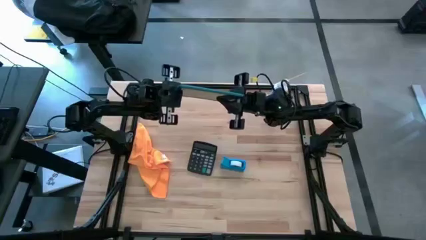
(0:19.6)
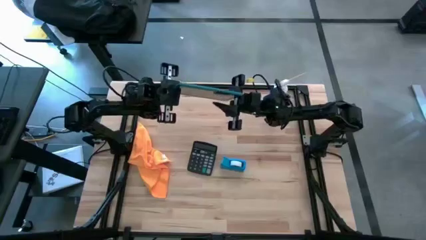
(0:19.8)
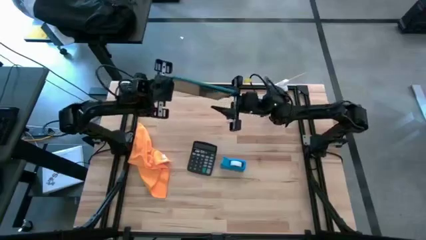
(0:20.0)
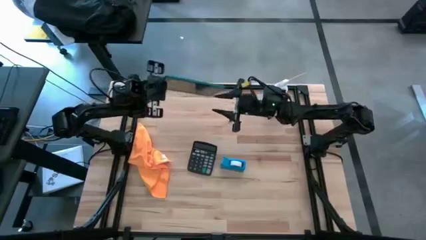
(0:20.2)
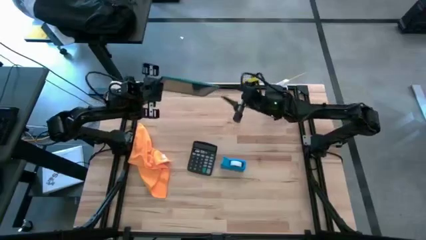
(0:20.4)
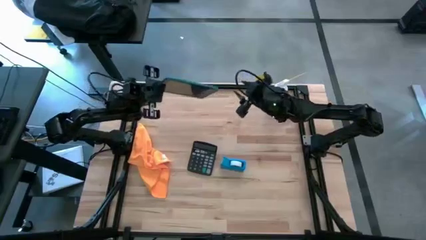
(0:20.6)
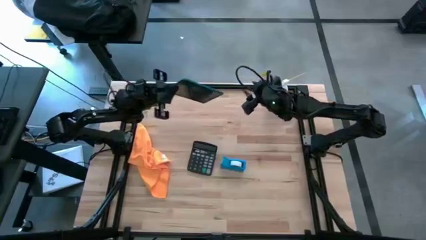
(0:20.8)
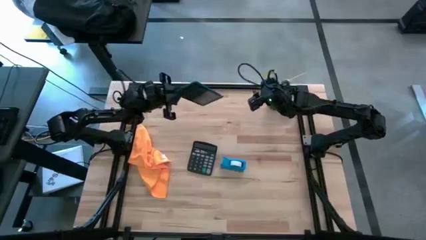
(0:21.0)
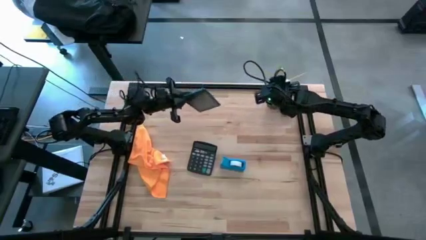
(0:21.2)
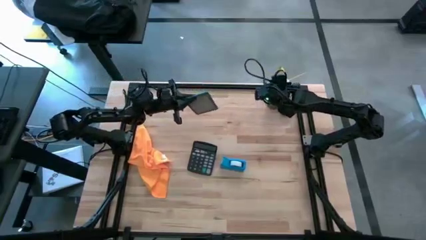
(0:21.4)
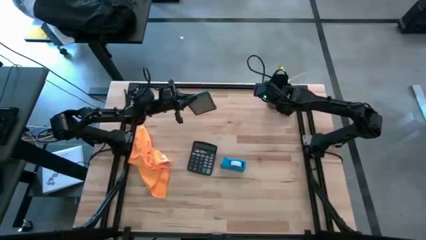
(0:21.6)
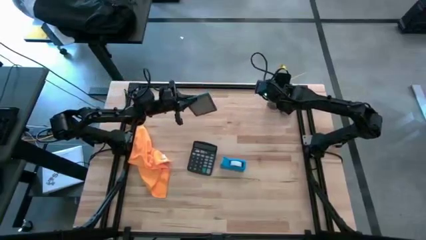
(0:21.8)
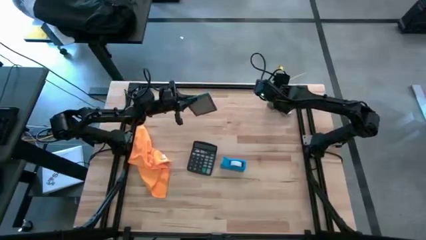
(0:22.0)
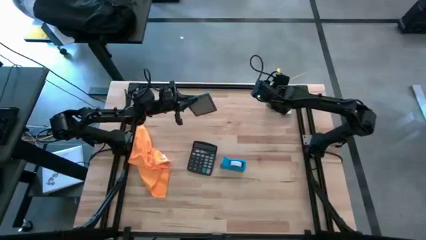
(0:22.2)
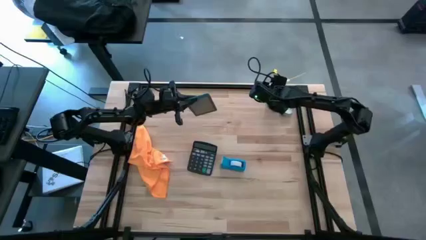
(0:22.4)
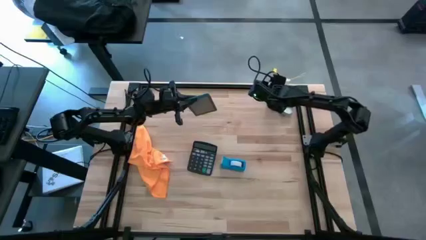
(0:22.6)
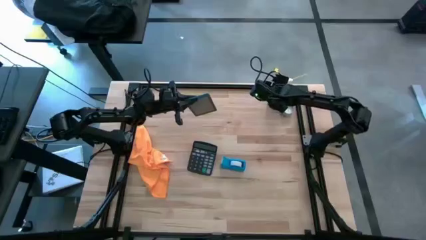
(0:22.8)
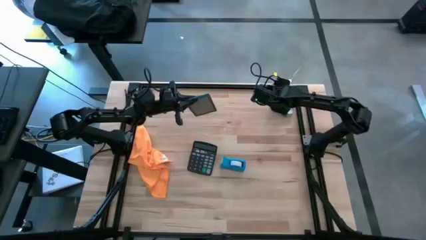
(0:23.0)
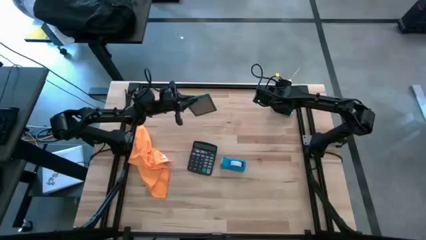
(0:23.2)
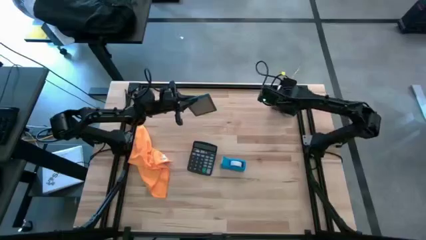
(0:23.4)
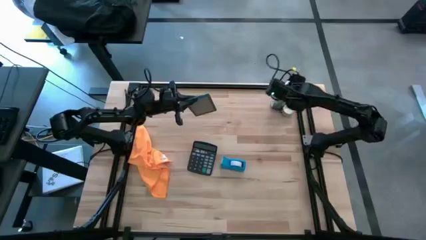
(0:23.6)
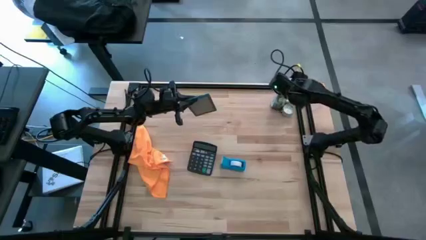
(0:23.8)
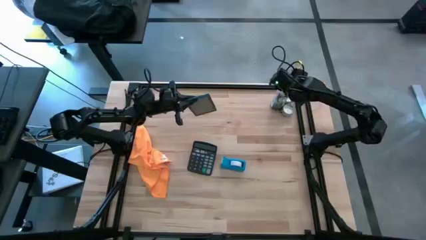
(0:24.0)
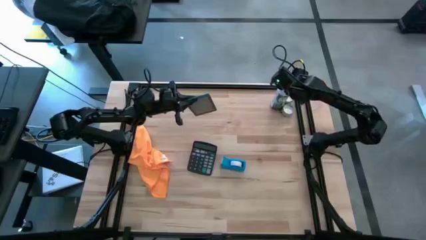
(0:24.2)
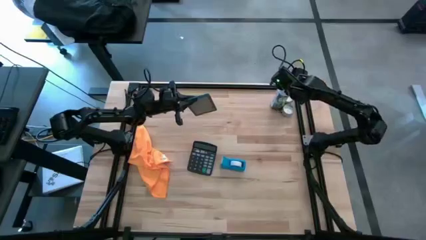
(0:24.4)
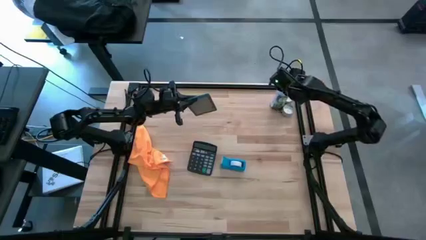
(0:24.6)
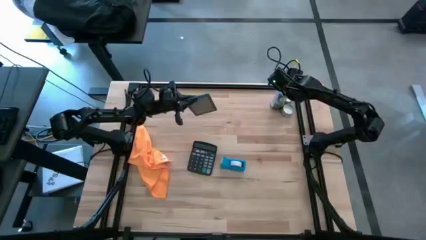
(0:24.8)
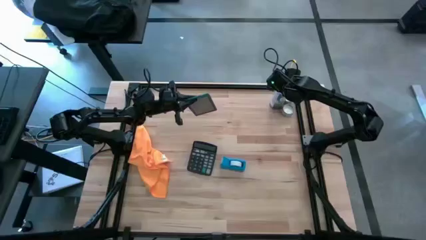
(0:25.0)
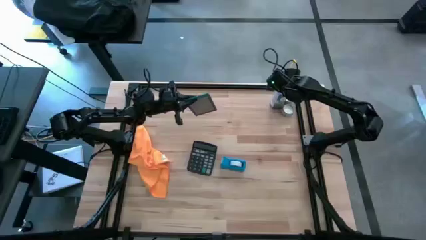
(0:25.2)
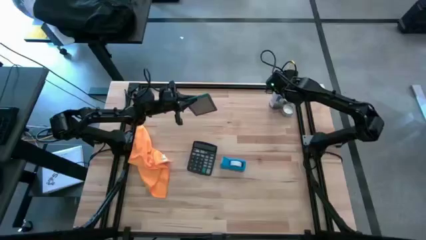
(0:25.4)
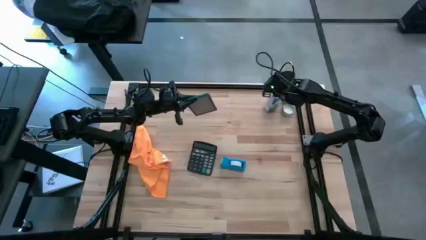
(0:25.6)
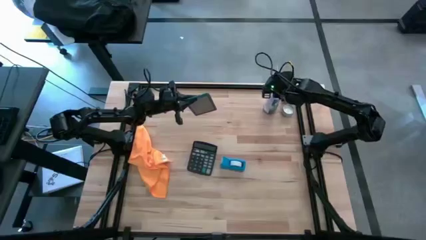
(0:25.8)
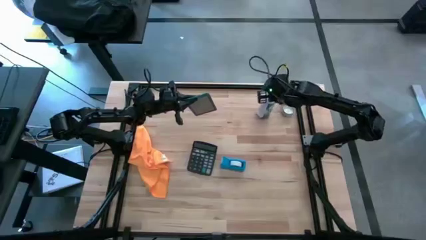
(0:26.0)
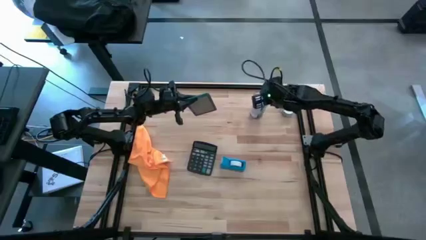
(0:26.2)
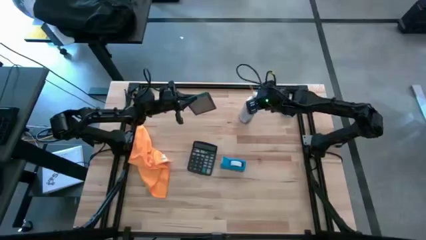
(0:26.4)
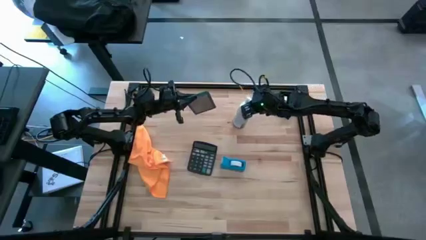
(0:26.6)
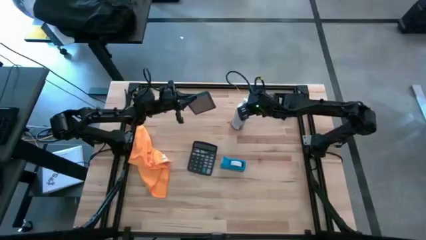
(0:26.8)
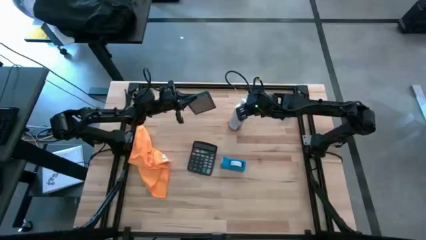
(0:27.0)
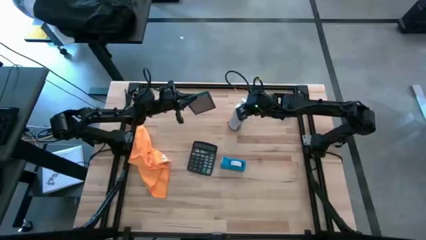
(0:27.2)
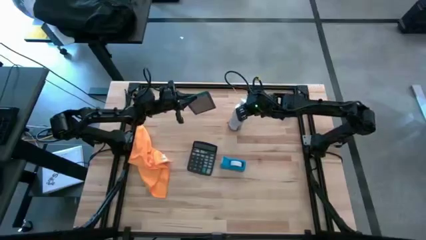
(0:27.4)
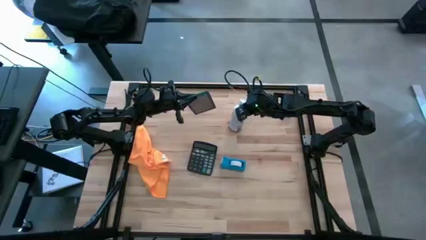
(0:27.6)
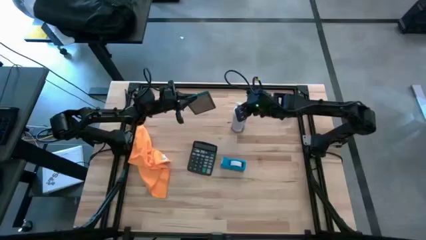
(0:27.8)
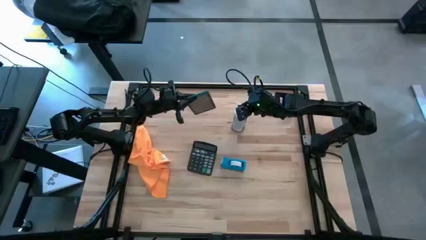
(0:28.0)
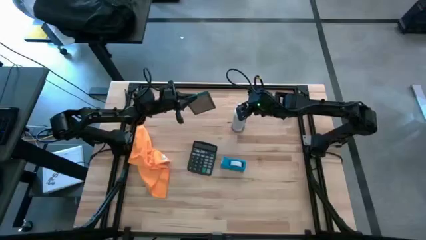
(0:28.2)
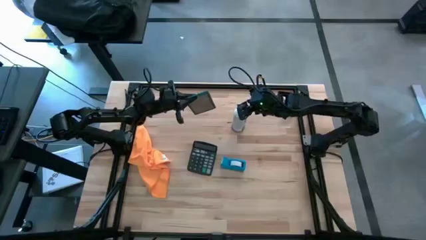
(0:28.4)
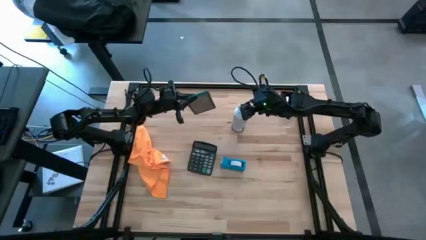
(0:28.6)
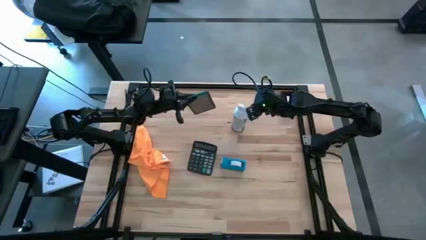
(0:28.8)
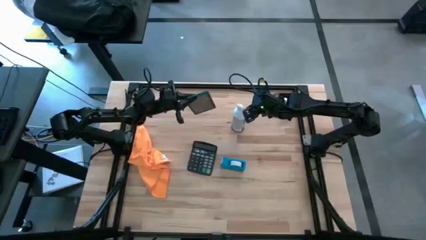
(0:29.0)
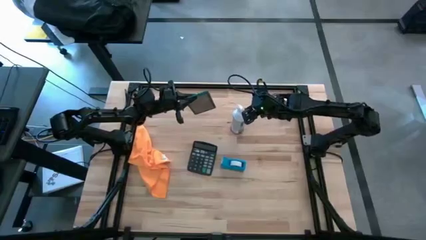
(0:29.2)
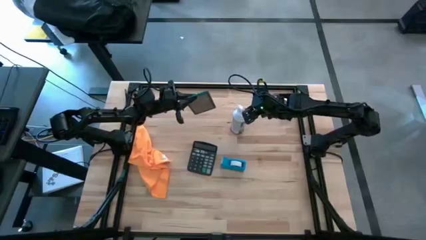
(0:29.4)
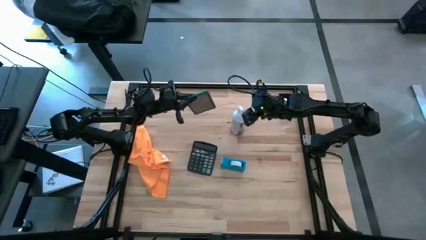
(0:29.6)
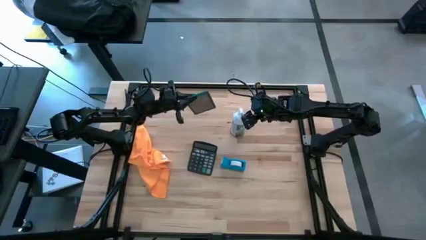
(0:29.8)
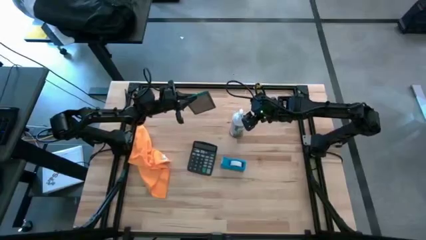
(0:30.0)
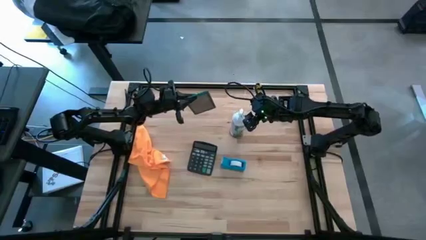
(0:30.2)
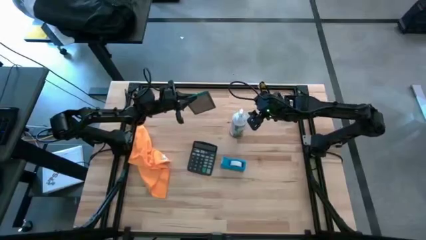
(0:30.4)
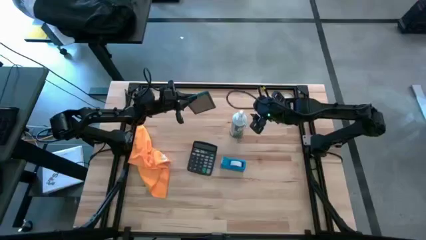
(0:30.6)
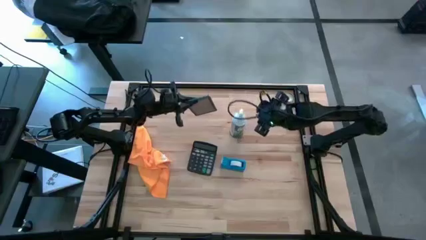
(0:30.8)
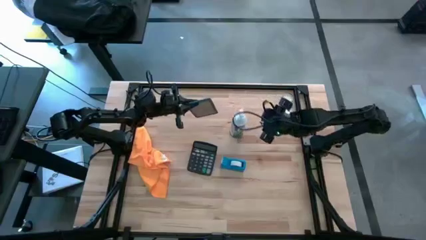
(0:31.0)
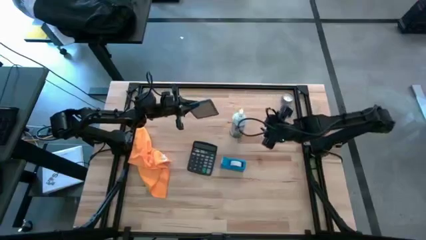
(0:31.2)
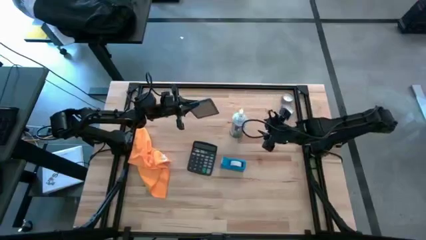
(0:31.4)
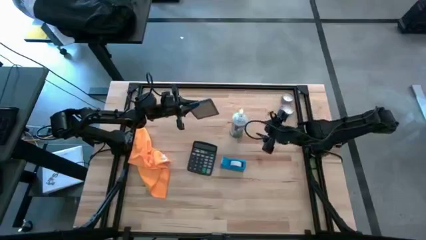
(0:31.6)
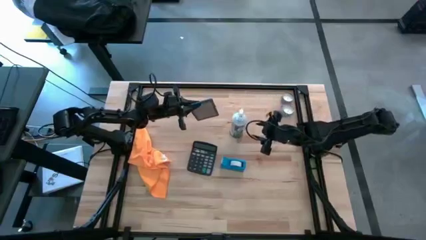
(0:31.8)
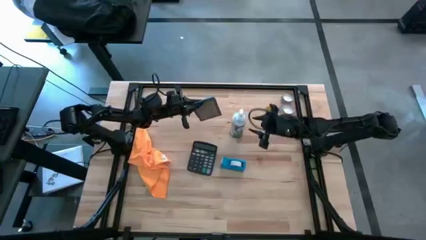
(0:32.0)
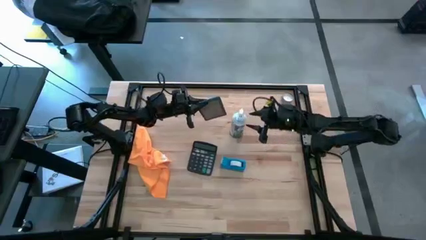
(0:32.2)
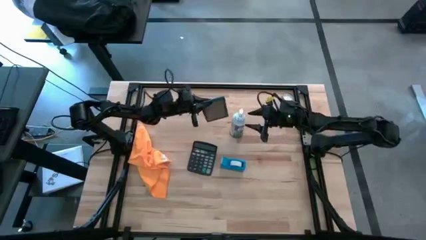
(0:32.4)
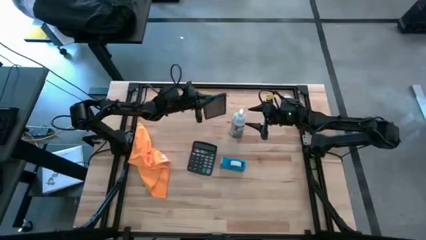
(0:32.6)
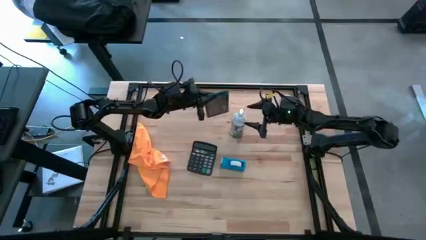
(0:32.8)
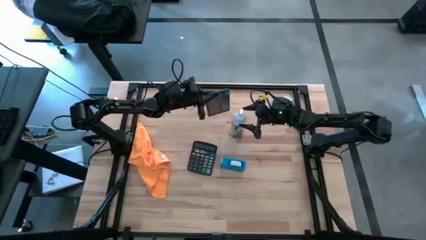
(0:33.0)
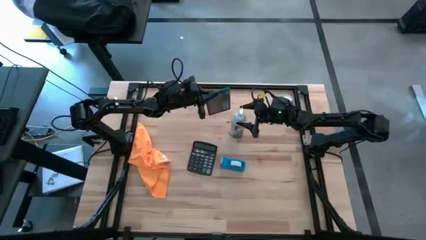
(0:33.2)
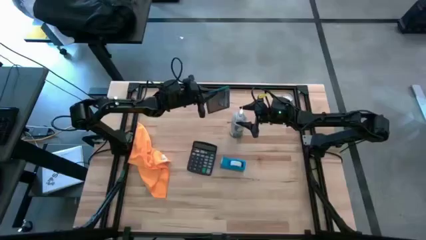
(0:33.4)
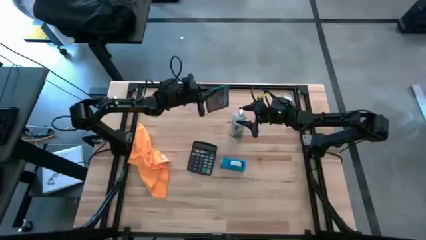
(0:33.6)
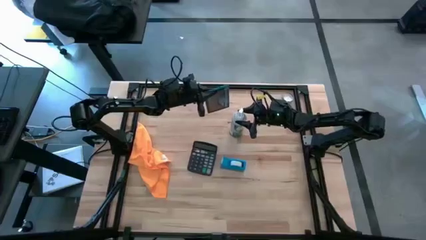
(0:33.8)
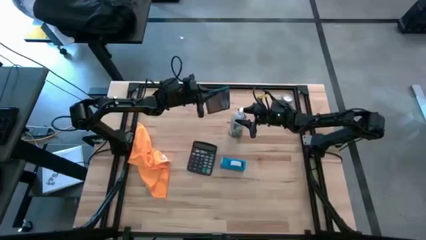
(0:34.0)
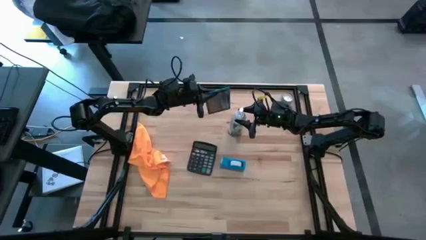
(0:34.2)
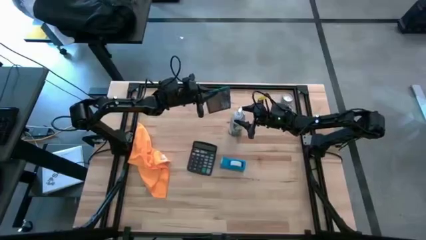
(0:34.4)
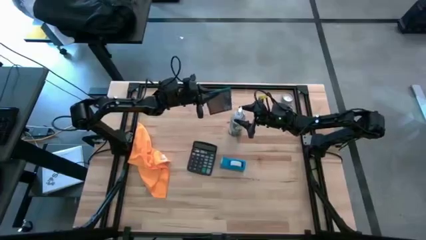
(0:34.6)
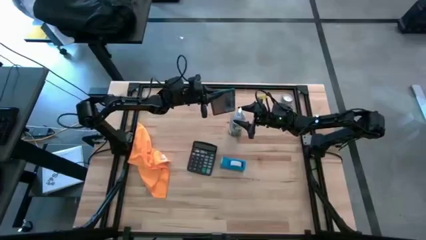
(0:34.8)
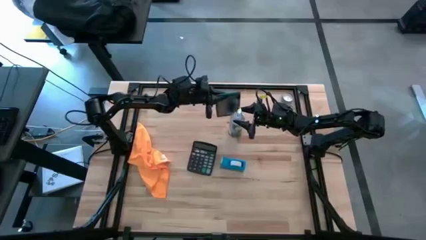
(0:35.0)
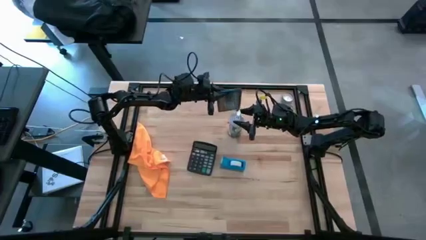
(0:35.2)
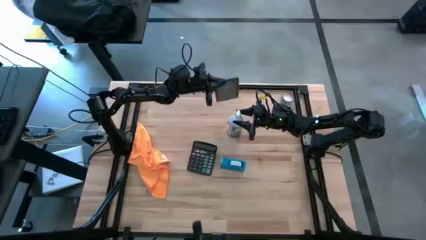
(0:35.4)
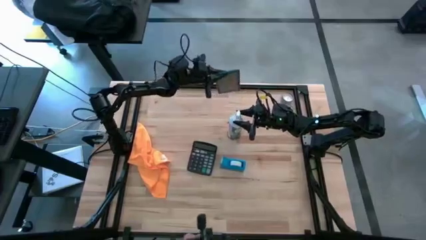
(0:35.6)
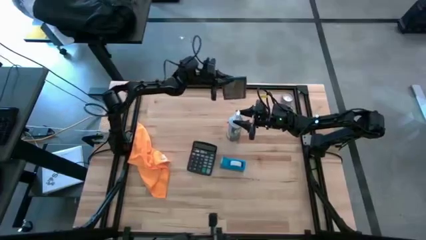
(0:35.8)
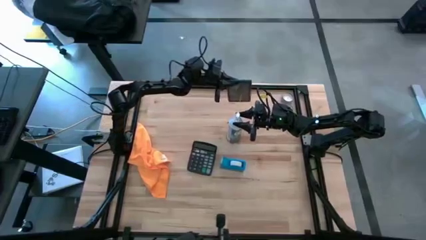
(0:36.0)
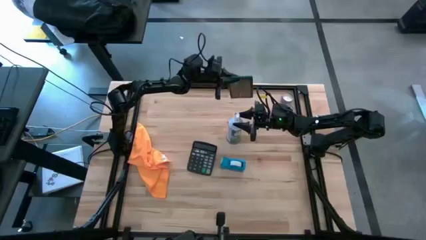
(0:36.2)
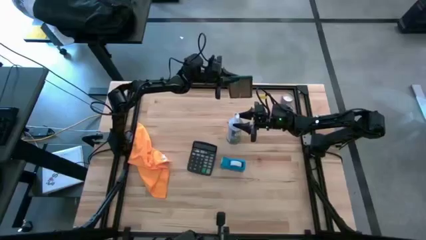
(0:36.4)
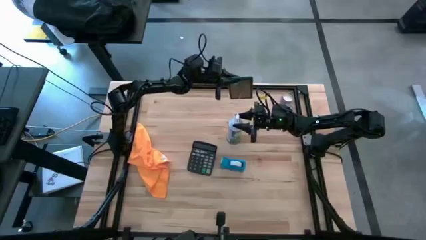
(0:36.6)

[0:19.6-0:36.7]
Task: Apply microfiber cloth
Spray the front of the cellphone with spray bottle
